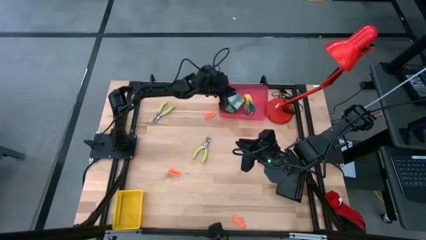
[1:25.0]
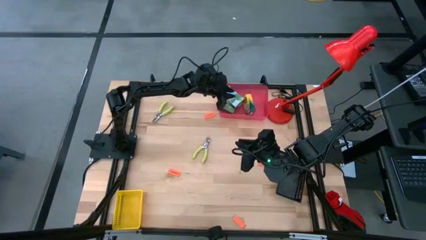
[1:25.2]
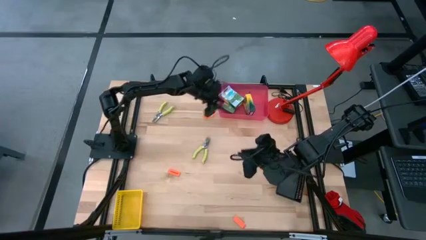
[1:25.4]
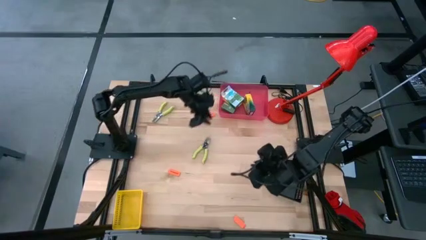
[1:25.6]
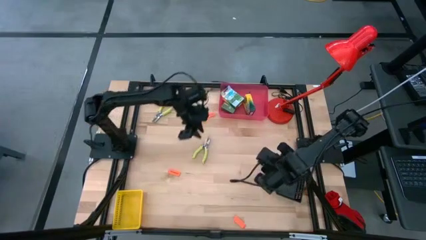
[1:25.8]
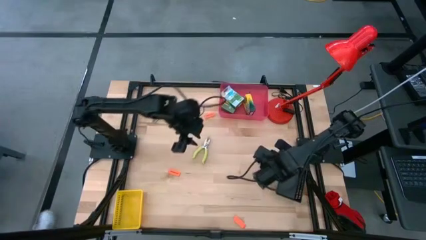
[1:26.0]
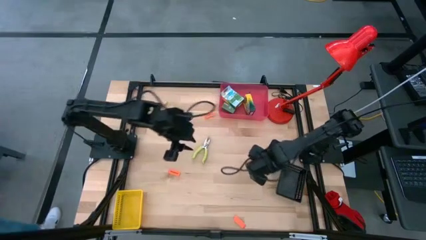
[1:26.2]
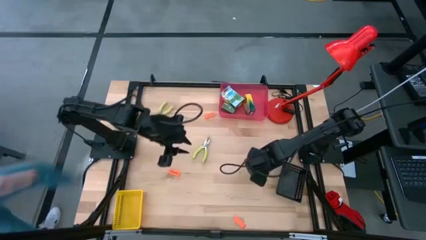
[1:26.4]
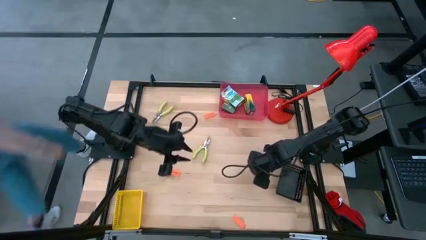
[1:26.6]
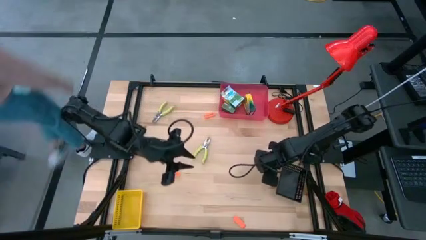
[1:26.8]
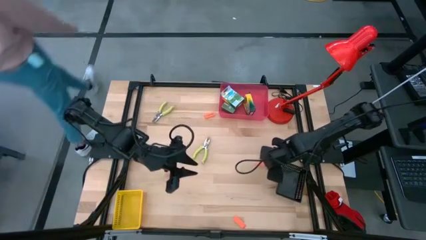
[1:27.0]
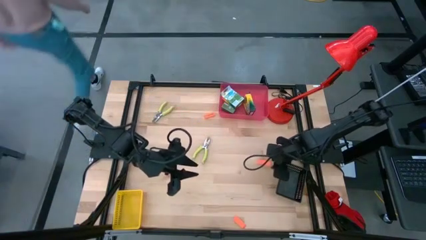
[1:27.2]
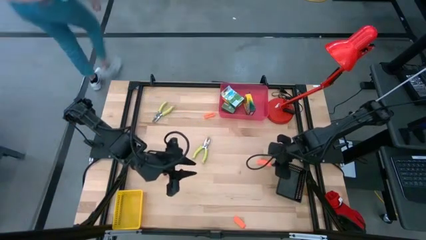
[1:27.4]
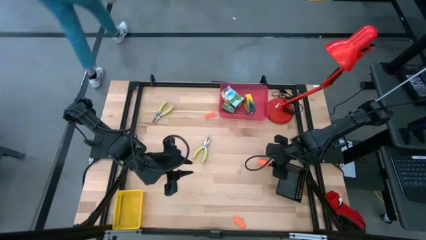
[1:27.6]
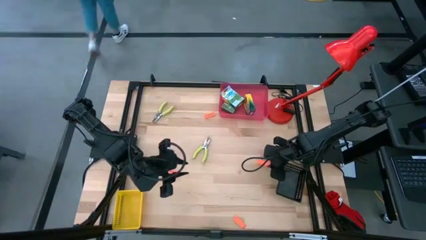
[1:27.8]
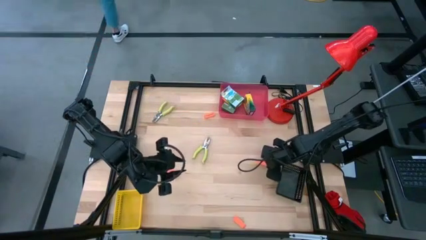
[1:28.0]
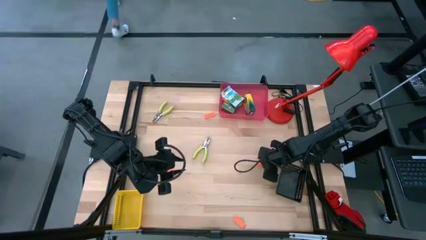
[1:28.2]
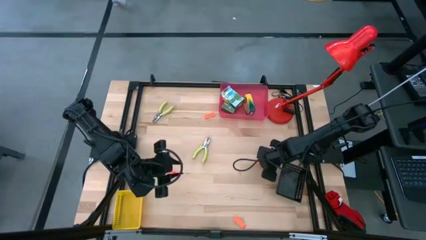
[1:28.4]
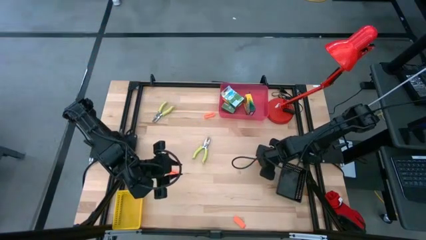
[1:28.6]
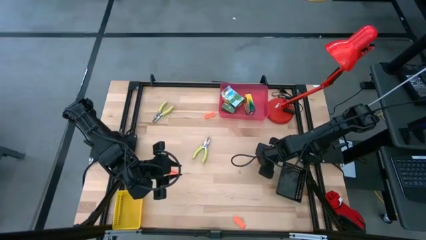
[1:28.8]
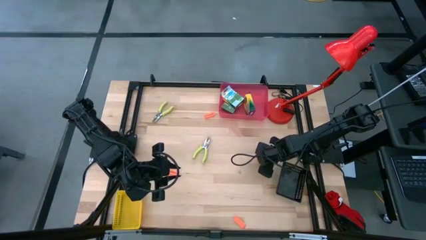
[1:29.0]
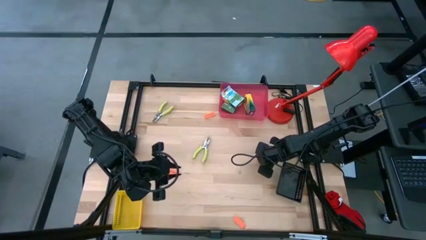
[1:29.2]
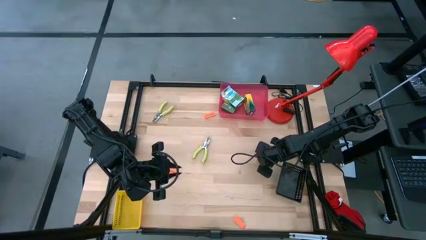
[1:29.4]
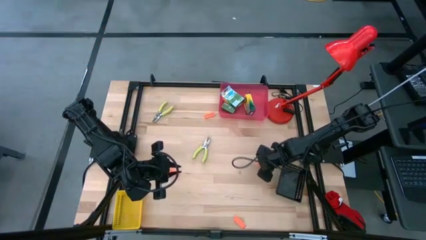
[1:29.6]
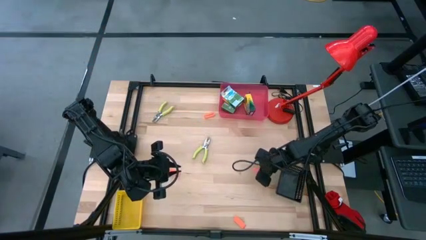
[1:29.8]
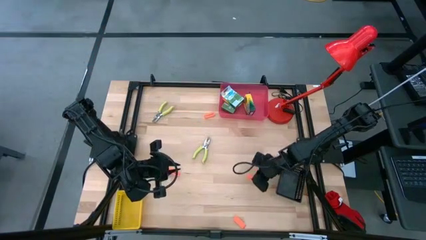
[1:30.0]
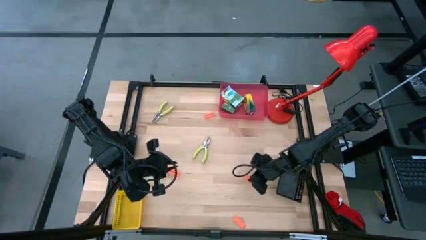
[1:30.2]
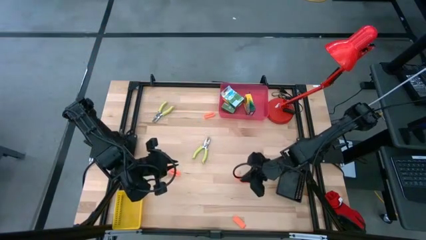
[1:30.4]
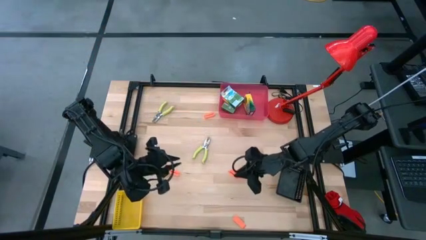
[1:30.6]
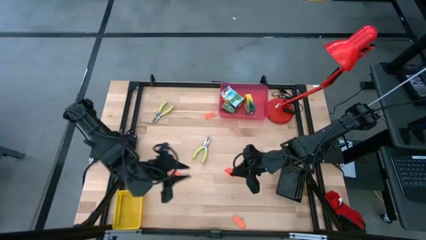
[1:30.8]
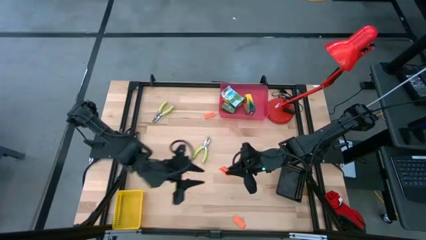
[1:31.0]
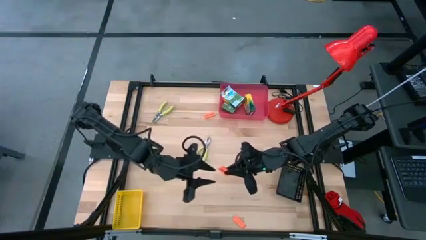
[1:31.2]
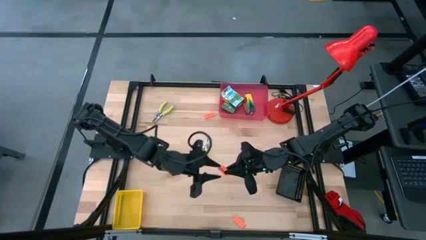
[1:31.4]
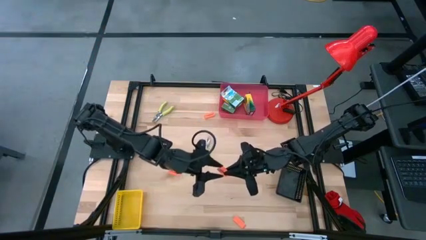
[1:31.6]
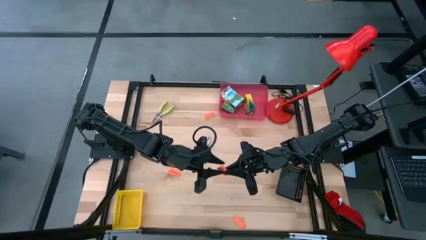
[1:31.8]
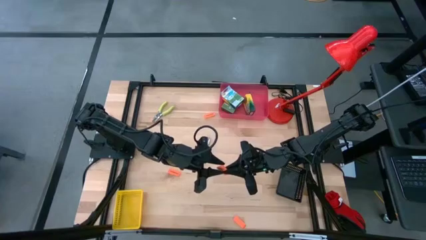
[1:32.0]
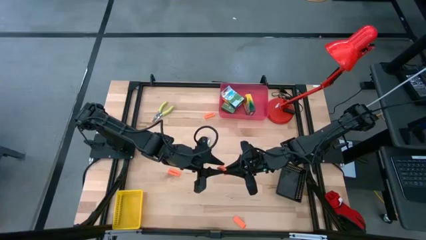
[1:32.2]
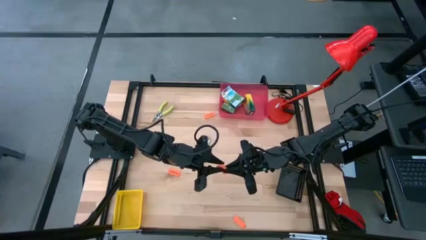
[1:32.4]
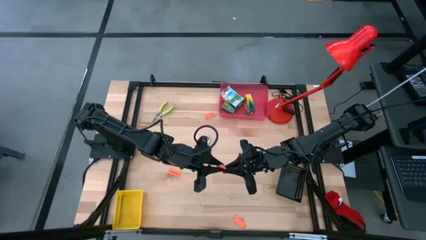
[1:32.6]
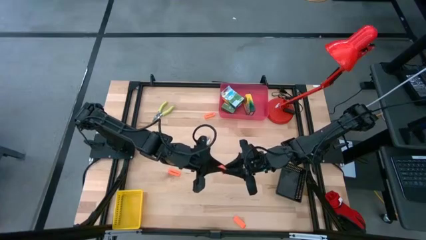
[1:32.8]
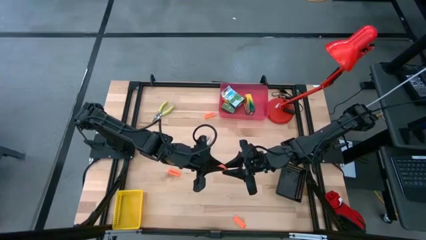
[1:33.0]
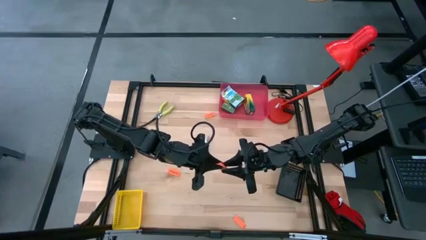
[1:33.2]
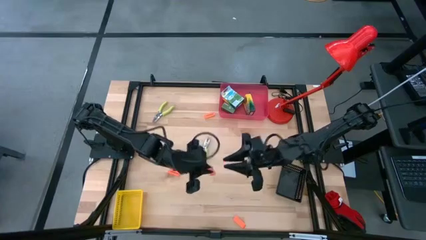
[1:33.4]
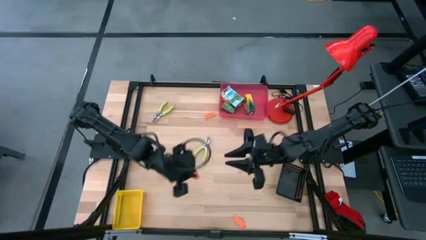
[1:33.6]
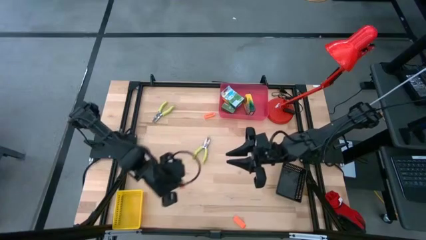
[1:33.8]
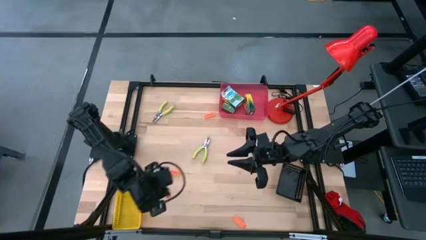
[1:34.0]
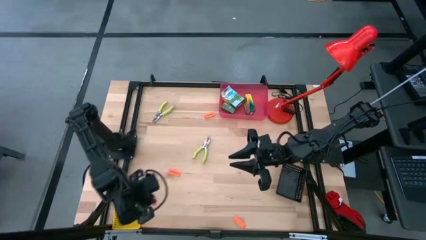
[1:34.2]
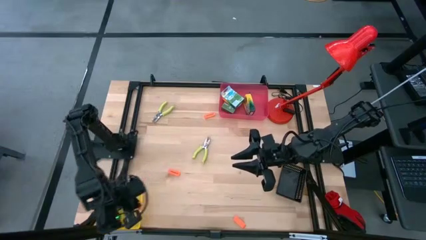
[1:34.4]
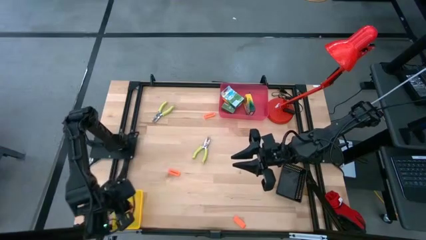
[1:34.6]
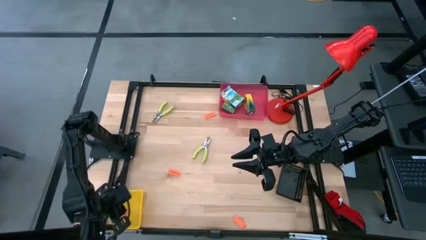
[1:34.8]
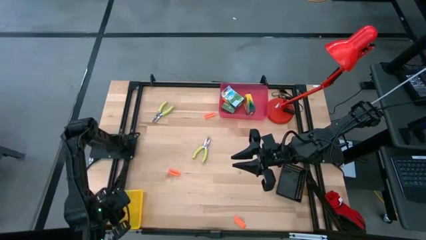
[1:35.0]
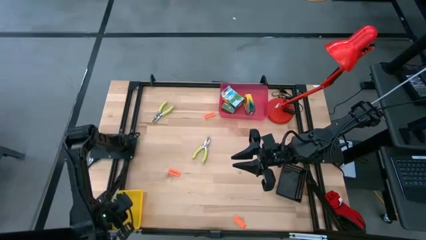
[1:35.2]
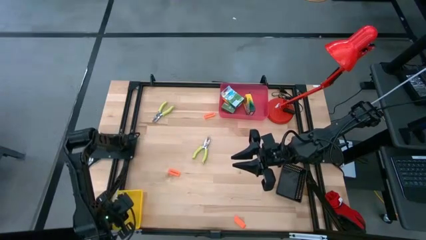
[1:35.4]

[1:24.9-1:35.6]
Task: Pick & Place School Supplies
Put the orange eraser into the yellow bin

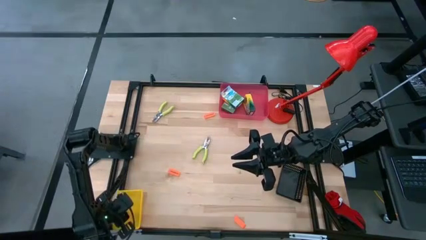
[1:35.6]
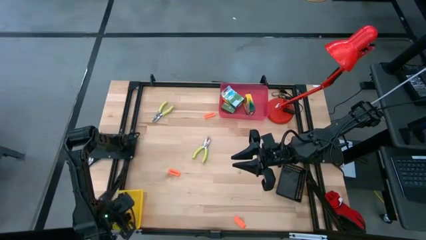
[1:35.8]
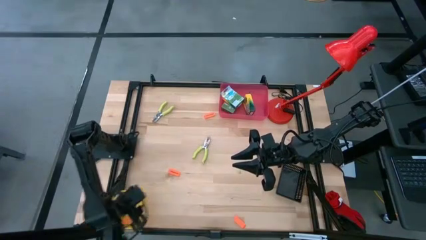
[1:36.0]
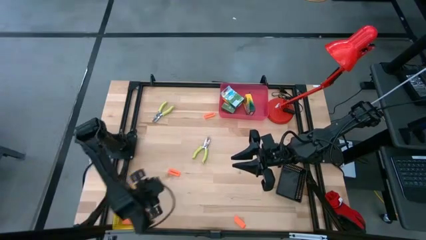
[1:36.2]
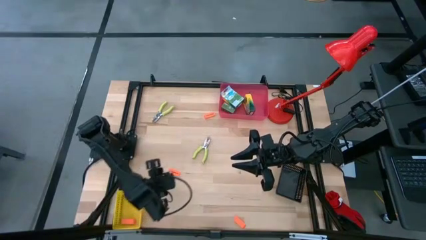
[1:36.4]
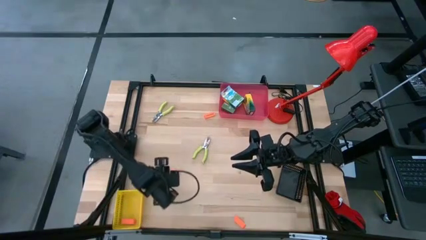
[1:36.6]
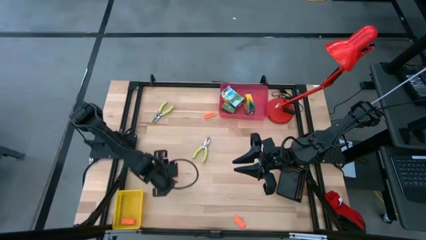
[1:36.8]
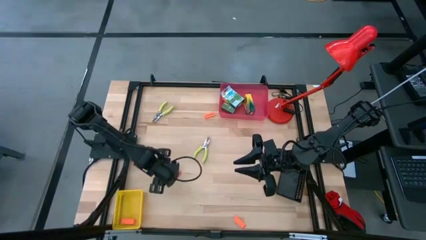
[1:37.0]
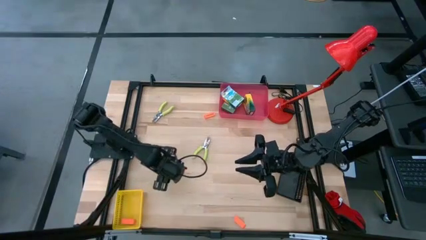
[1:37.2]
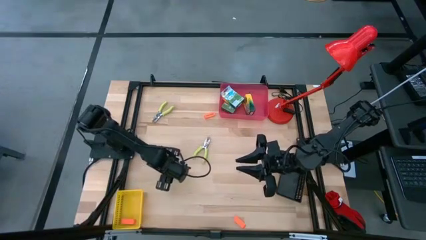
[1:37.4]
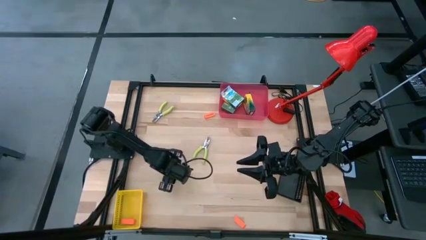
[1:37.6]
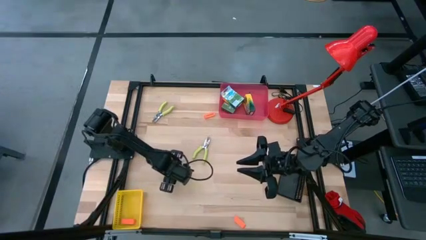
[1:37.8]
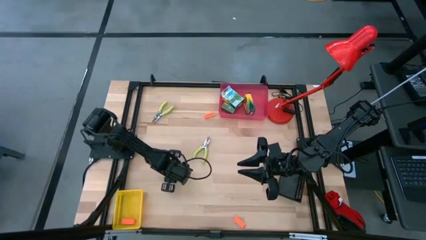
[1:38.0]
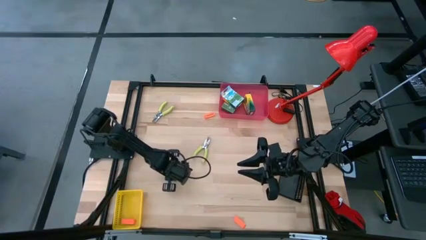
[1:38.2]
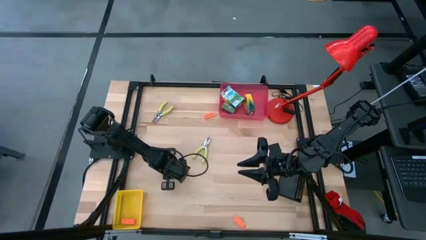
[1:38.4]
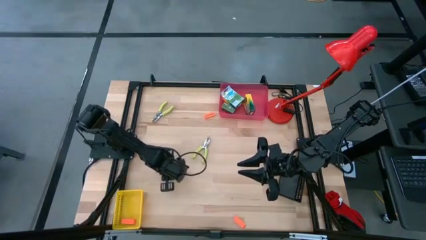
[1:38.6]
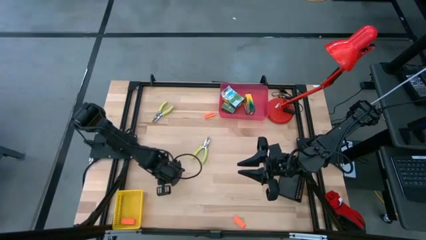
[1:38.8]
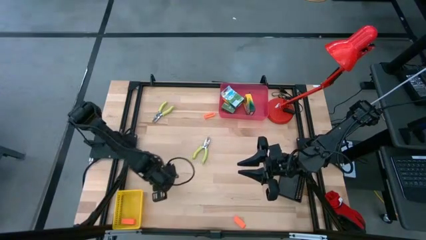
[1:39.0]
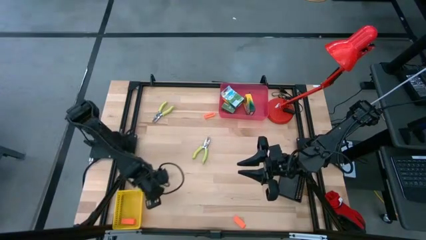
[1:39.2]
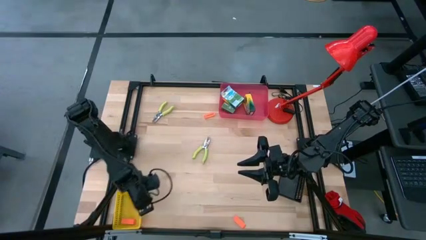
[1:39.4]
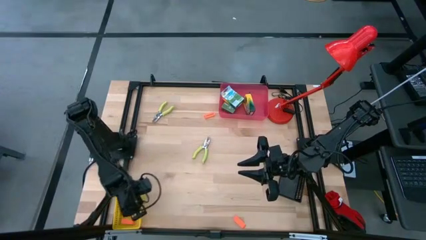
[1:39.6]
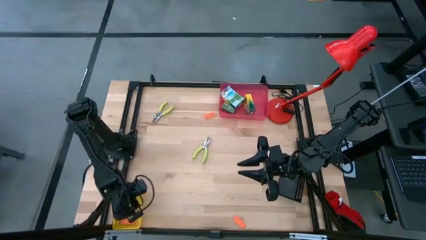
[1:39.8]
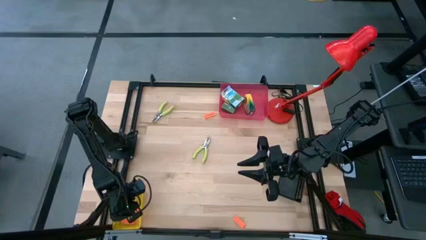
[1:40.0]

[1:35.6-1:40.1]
Put the orange eraser into the yellow bin

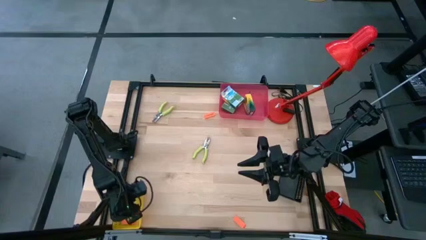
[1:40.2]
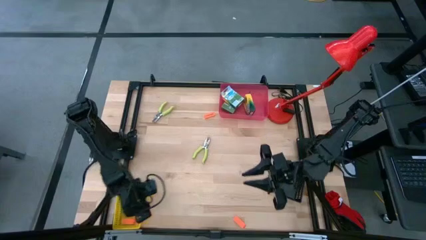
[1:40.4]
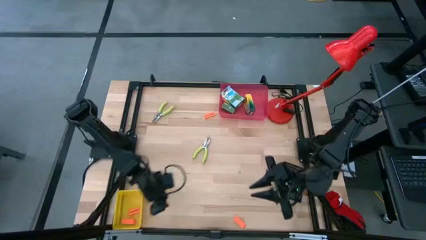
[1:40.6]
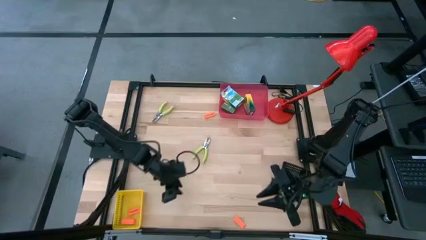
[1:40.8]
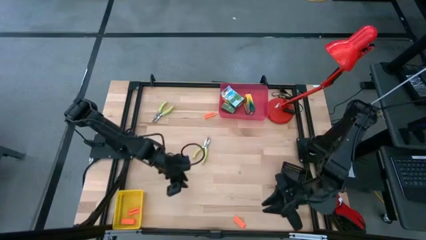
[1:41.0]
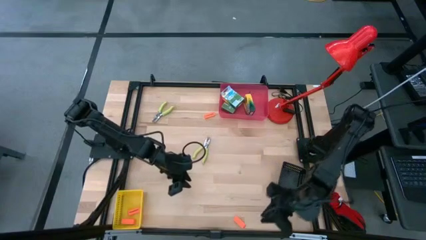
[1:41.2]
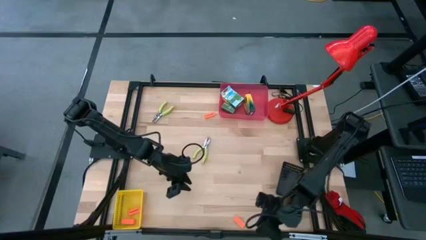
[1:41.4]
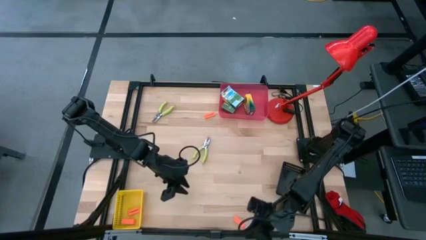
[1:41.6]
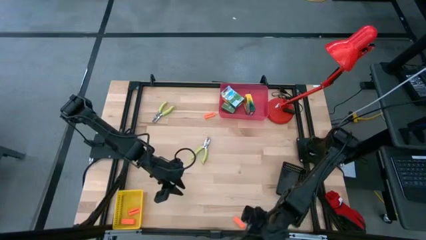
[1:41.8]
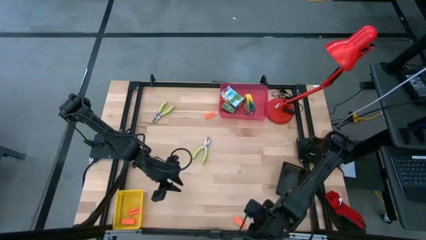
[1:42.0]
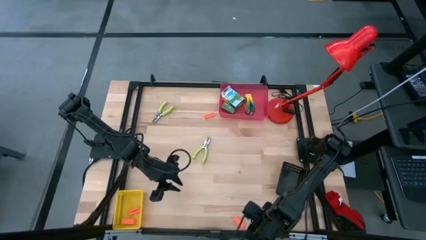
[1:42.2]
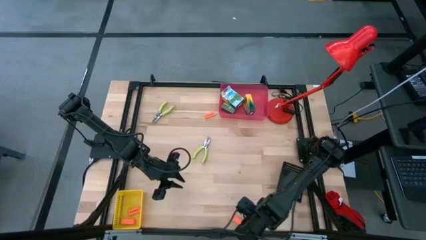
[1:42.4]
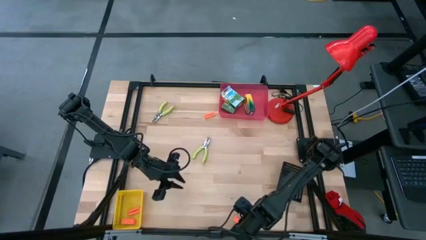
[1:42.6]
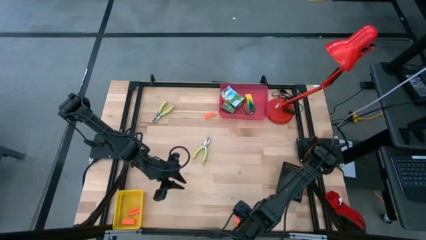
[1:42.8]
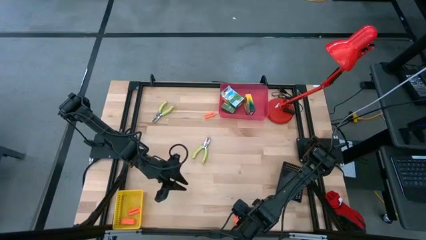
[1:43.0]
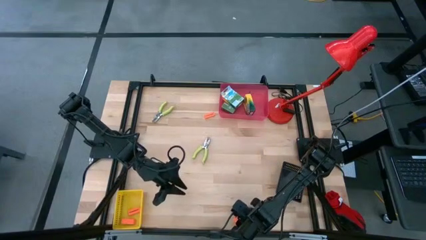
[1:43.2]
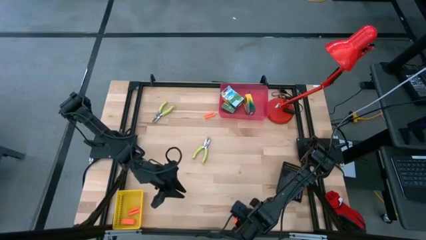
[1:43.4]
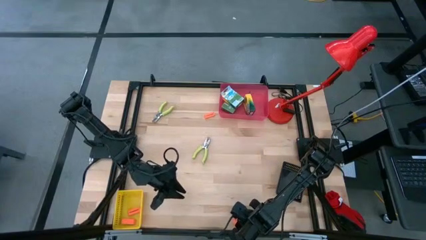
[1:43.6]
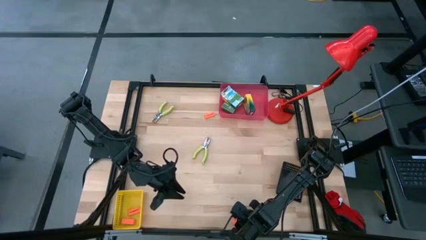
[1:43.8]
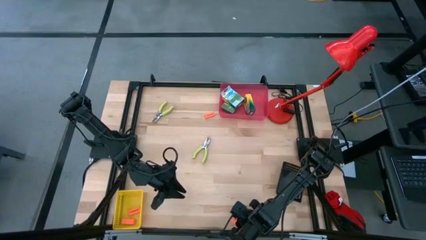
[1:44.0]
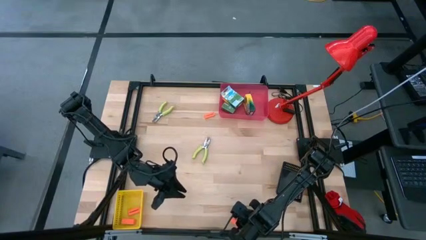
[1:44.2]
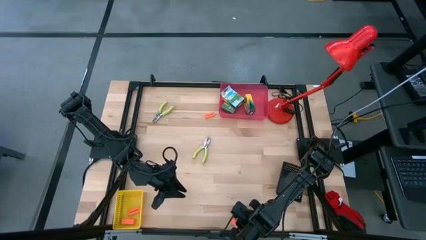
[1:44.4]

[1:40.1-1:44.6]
Put the orange eraser into the yellow bin
